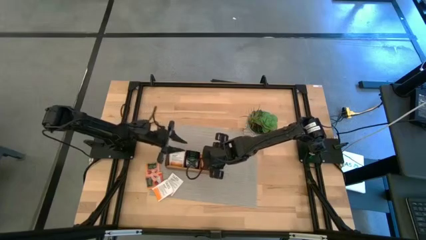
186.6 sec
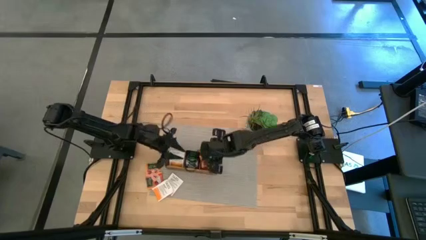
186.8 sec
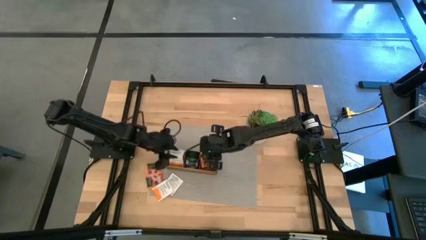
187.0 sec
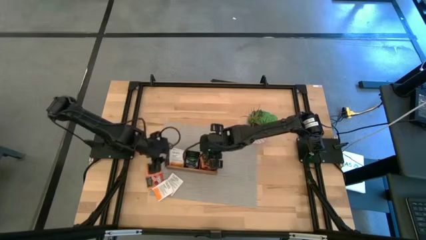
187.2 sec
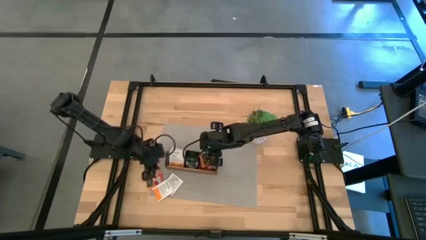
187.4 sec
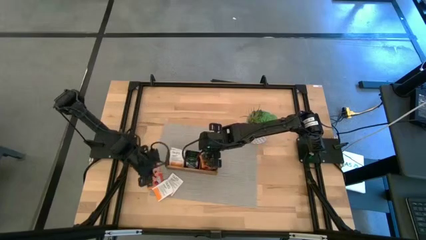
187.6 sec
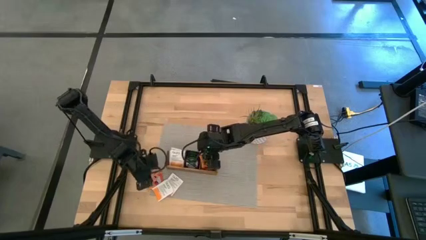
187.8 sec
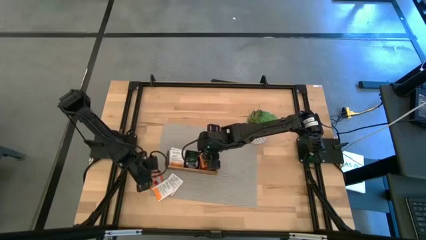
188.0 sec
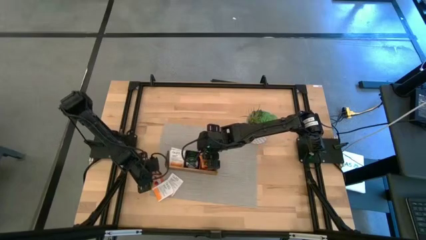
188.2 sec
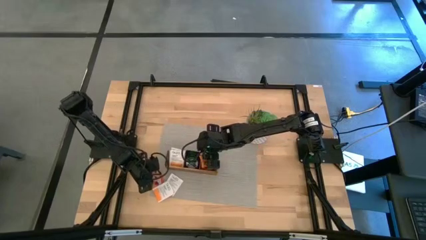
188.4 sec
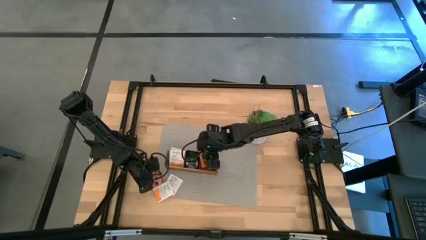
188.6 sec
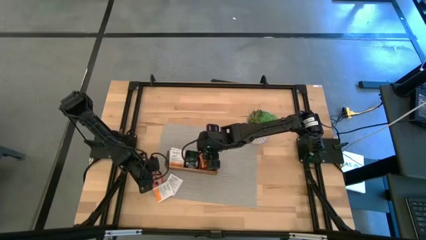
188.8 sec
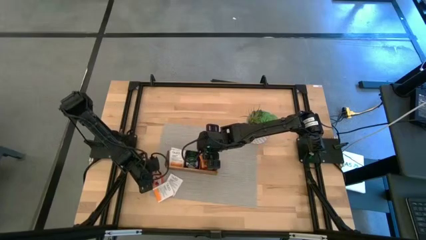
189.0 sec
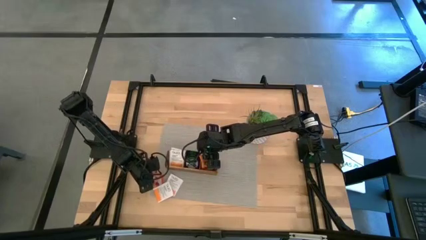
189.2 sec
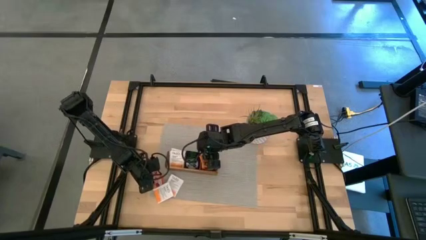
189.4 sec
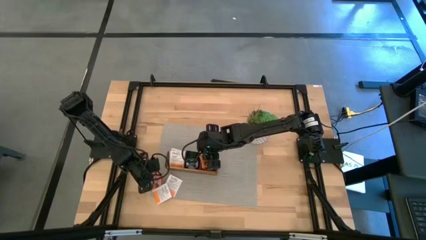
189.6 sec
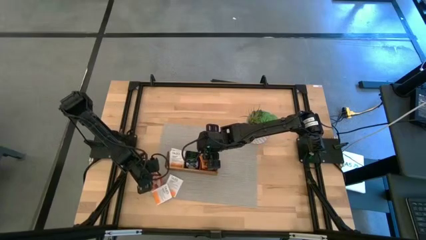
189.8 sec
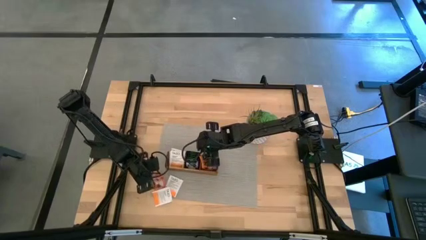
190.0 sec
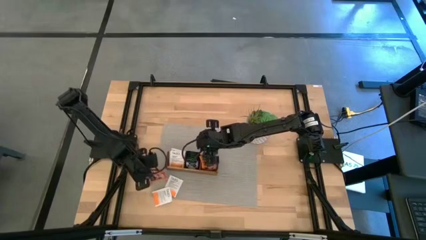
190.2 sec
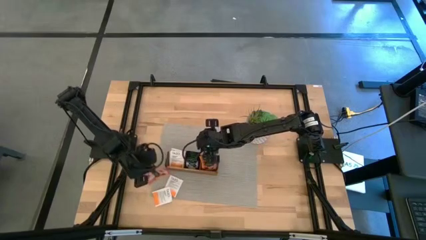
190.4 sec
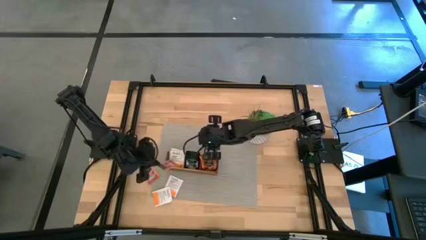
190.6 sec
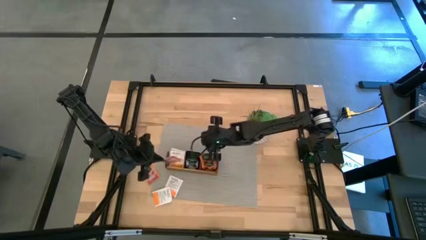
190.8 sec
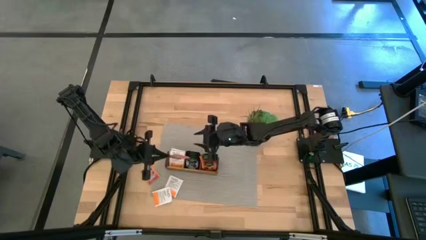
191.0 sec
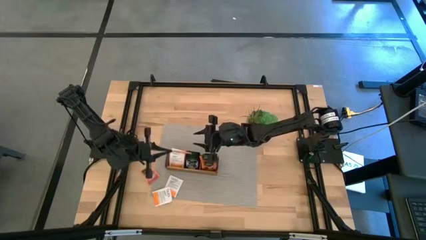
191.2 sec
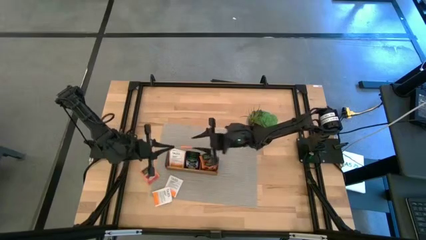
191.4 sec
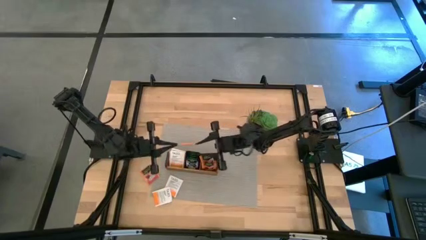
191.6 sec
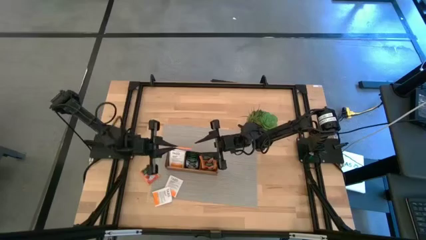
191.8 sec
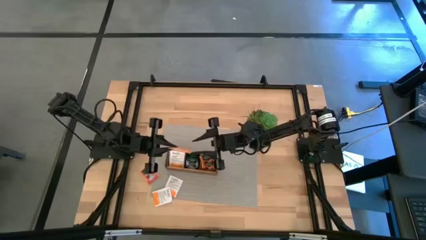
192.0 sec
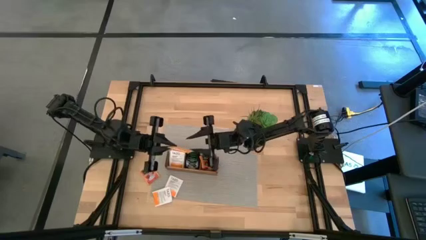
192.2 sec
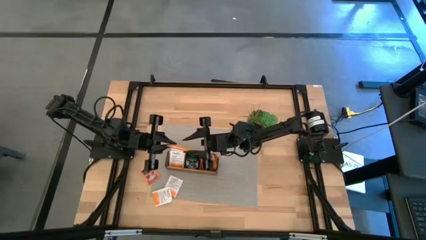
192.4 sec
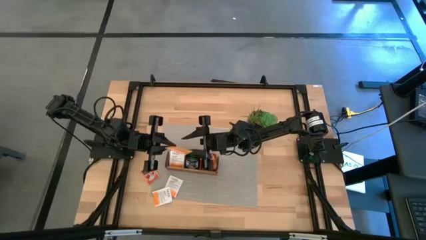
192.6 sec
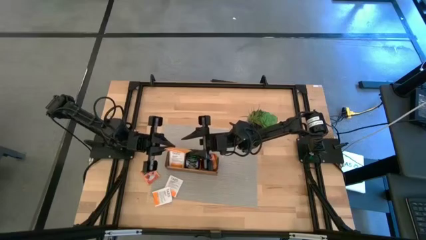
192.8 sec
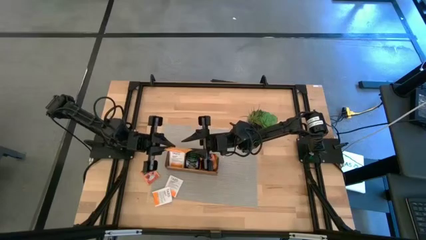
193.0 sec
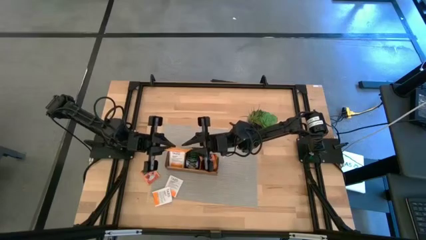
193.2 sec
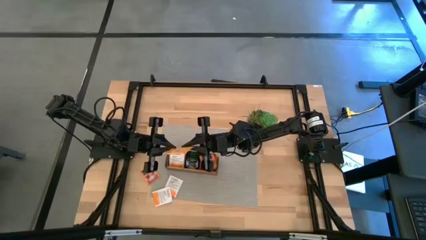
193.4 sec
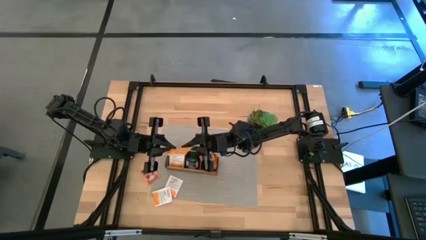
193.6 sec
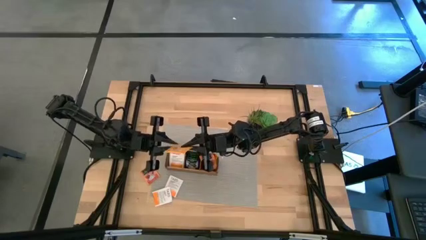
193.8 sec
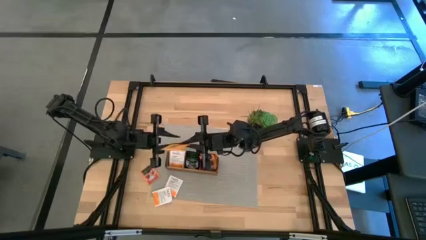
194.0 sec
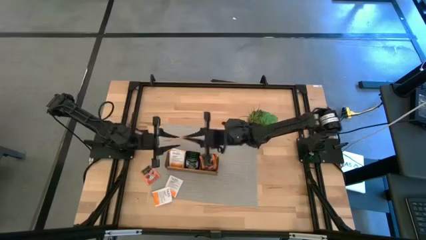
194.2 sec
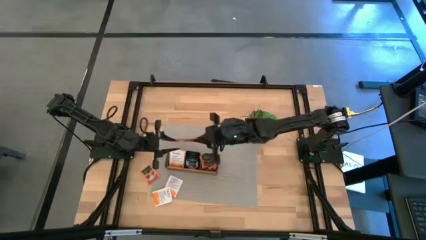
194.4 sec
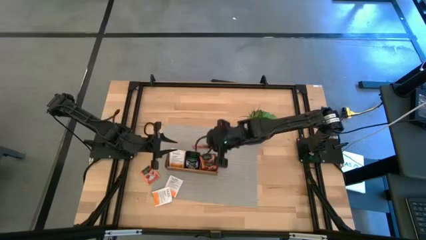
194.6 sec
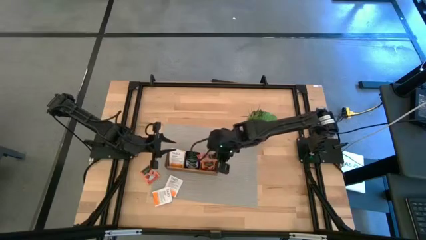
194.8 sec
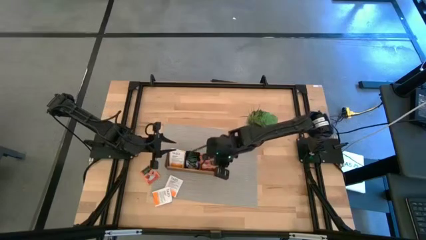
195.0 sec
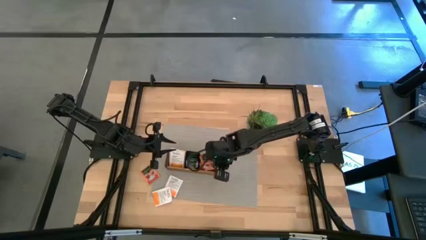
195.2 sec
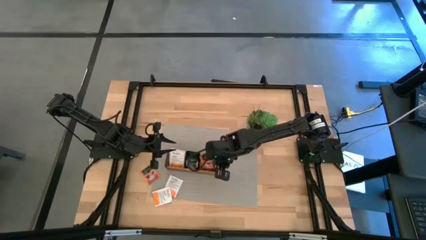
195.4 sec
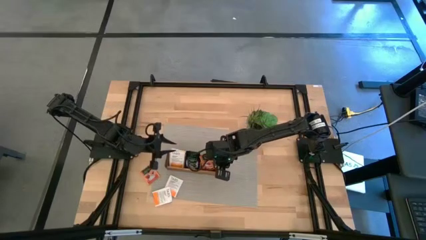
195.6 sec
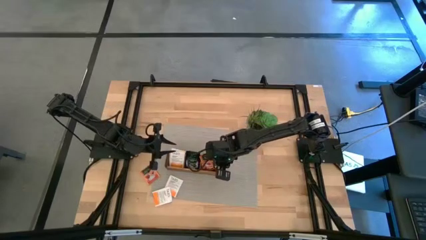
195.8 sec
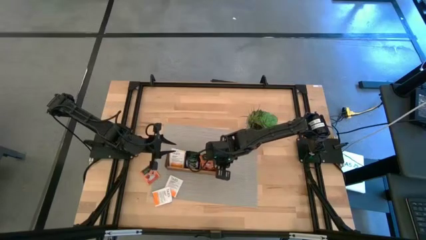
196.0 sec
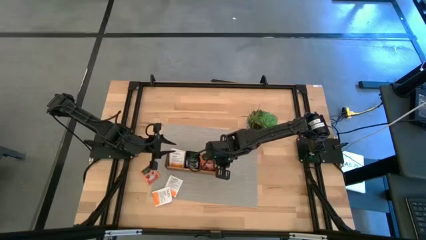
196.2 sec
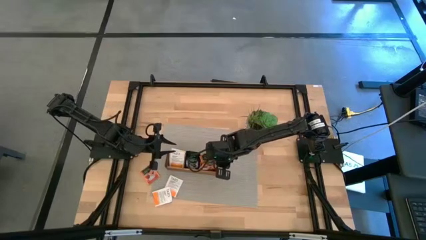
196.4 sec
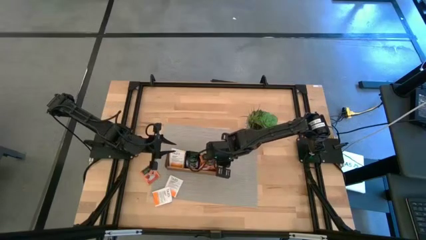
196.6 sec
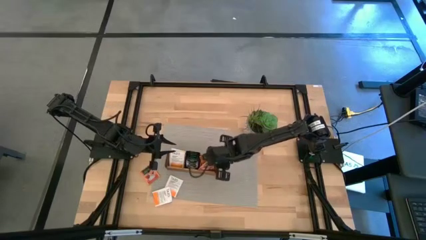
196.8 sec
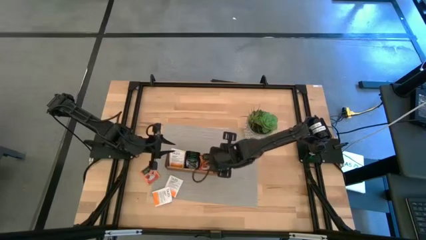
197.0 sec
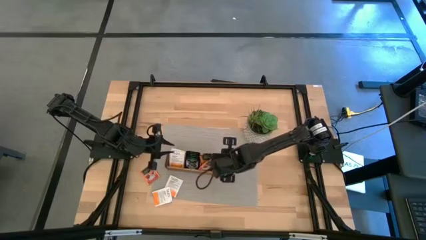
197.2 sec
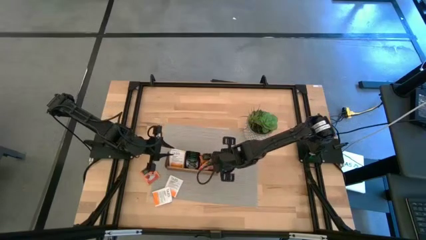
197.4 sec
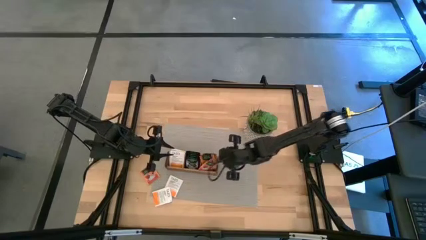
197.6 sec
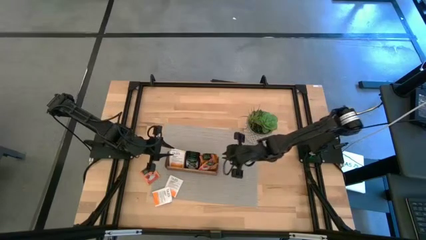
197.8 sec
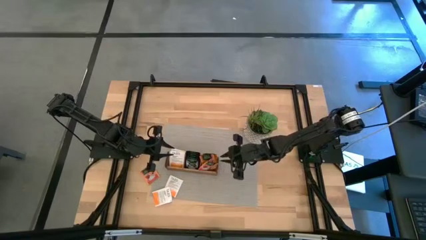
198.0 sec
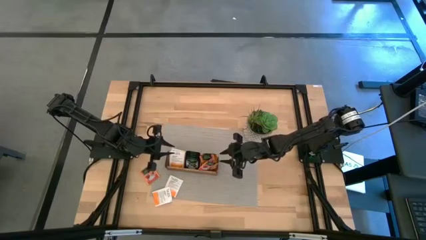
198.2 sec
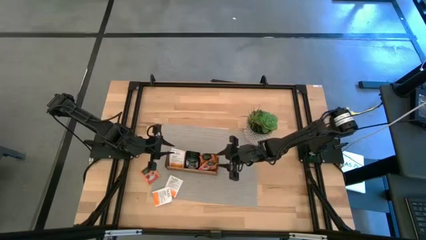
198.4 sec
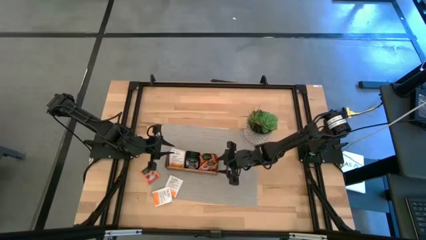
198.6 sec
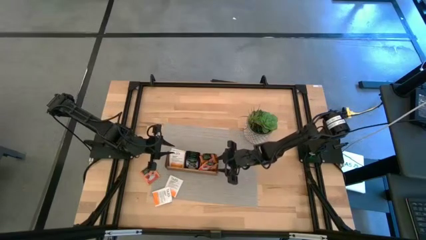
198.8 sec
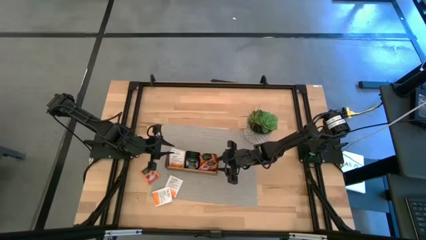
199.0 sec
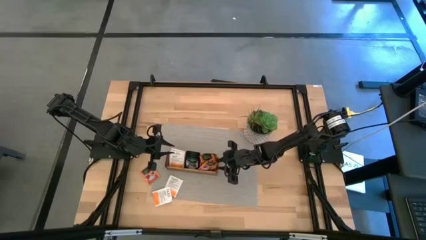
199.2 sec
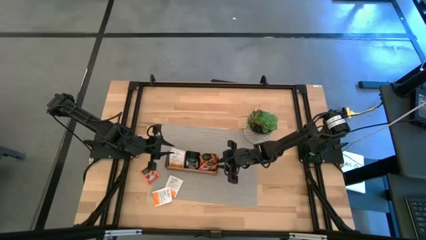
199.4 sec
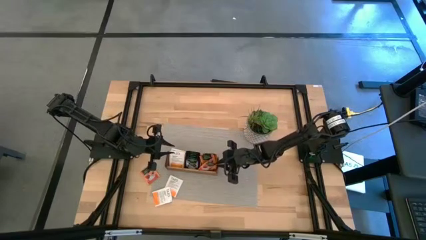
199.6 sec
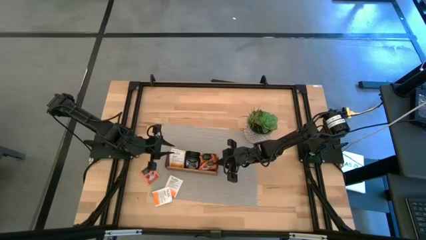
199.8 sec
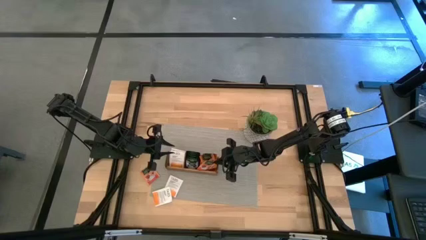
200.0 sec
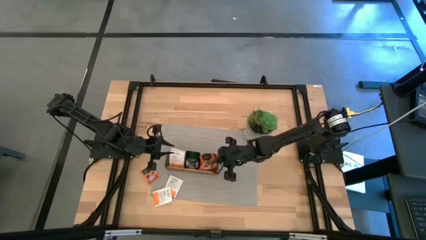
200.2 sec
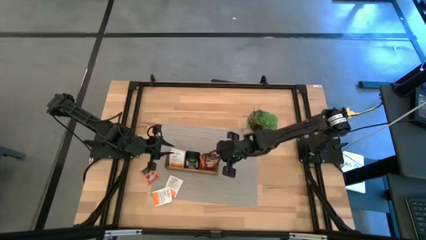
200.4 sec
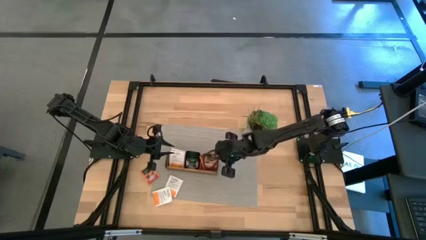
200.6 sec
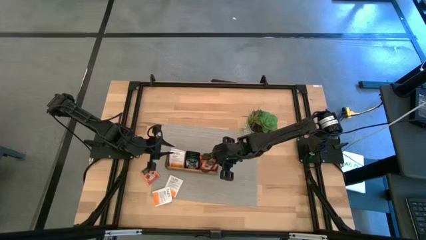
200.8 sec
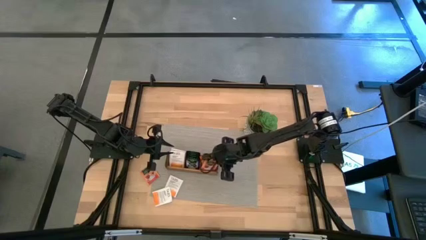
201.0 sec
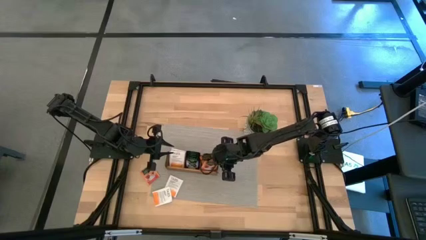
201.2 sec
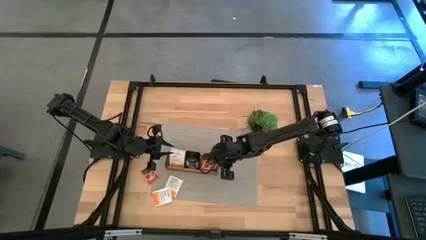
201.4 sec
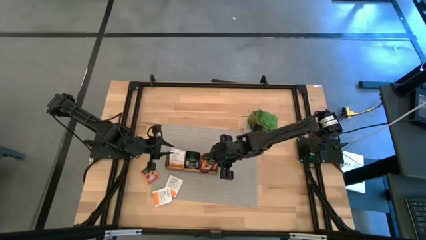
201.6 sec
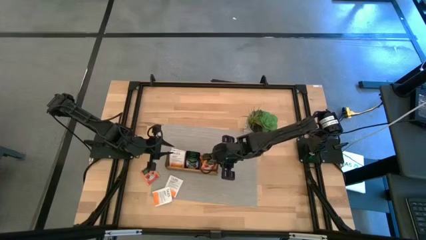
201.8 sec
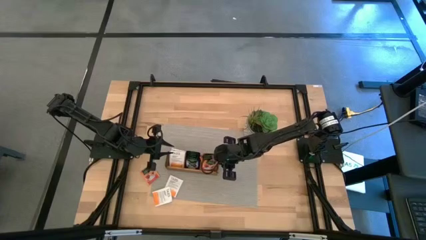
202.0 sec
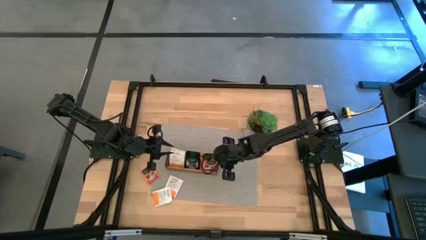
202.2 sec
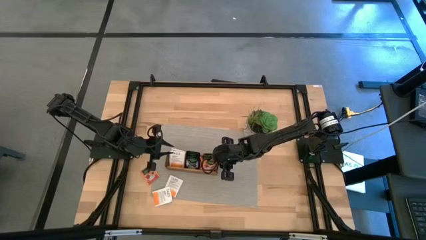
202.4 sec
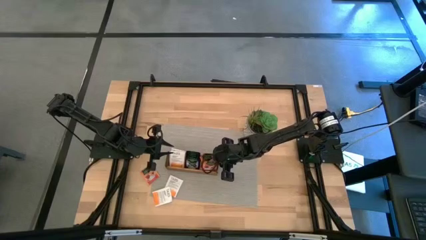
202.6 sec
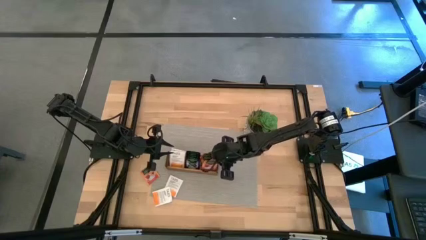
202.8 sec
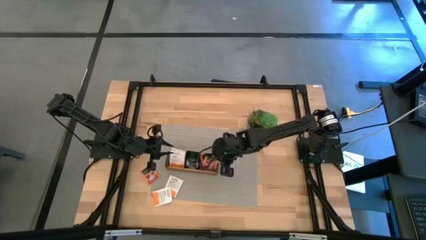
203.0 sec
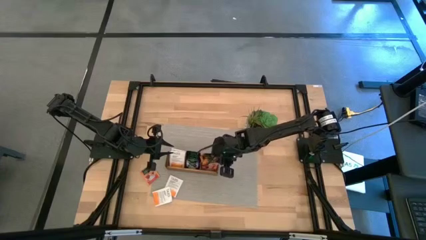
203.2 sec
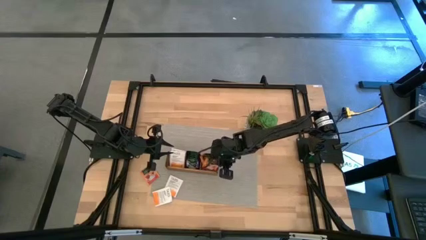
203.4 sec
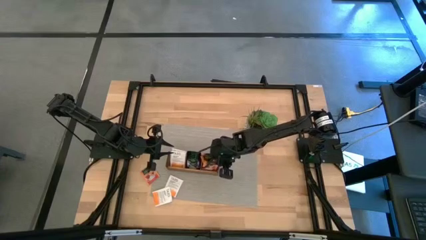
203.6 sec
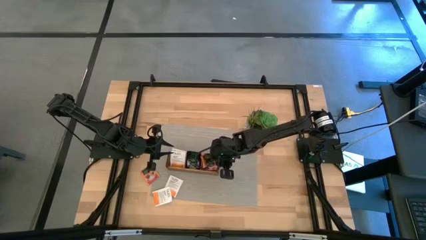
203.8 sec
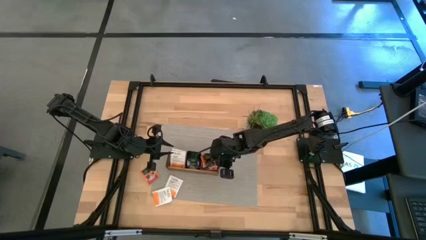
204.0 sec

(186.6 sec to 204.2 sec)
Task: Pick & Place Tea
Put the orange tea bag into the right section of the wooden organizer
